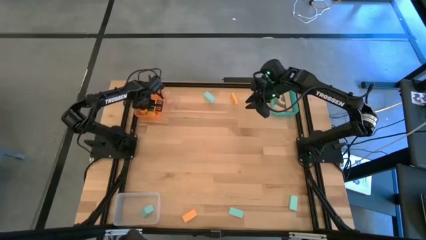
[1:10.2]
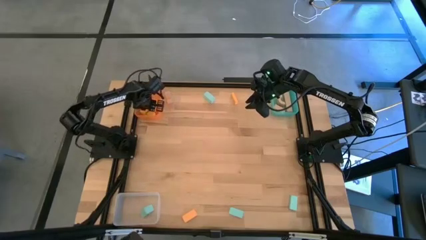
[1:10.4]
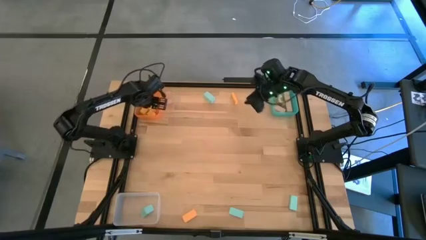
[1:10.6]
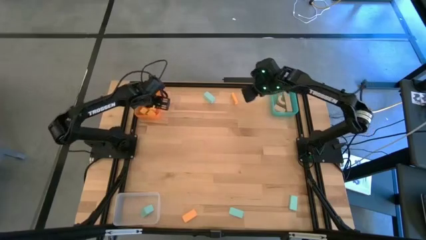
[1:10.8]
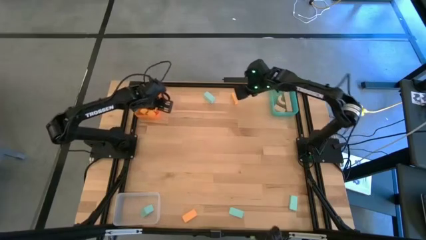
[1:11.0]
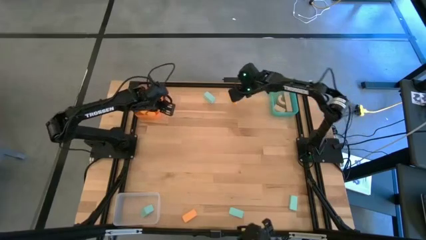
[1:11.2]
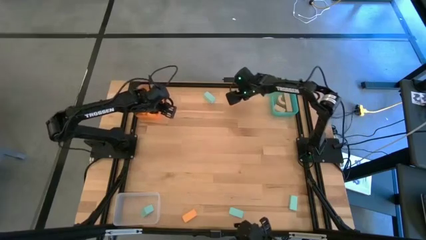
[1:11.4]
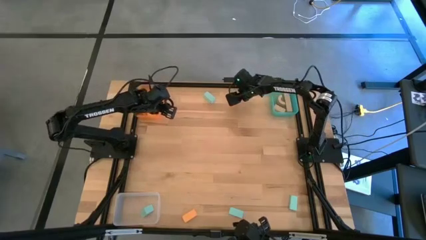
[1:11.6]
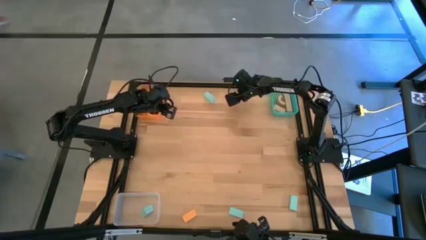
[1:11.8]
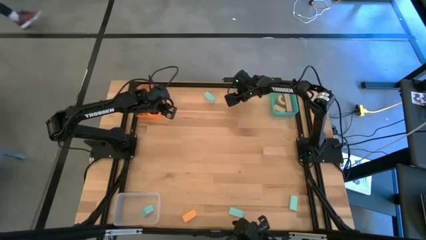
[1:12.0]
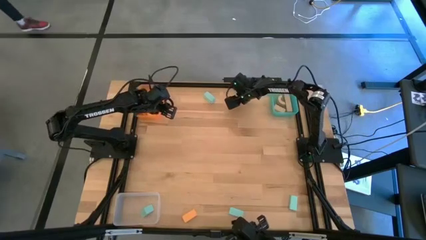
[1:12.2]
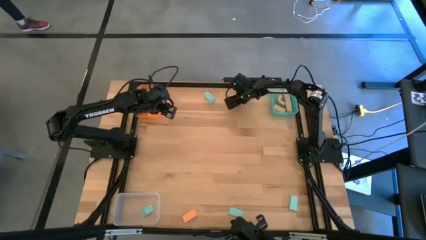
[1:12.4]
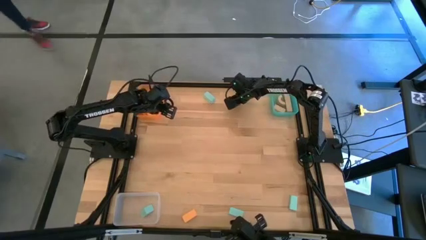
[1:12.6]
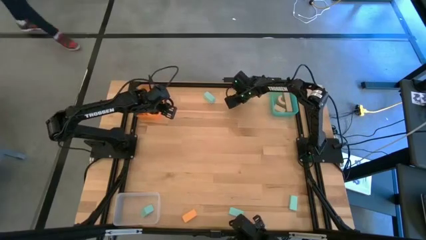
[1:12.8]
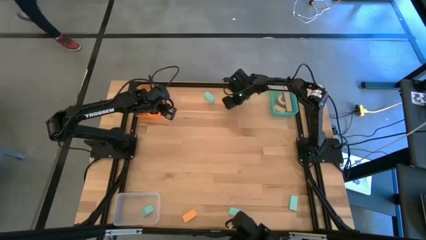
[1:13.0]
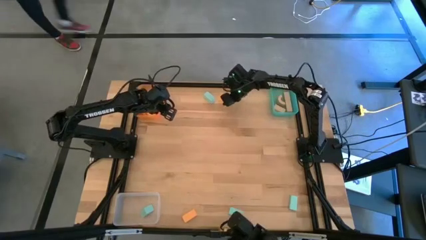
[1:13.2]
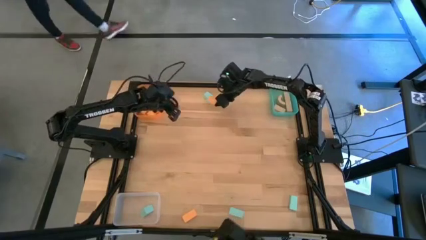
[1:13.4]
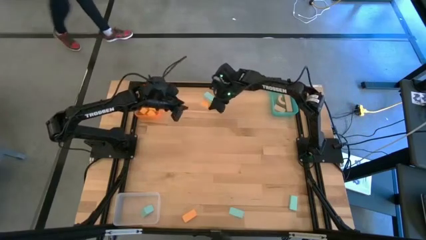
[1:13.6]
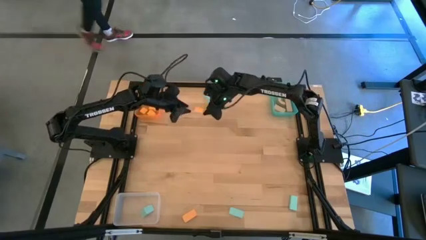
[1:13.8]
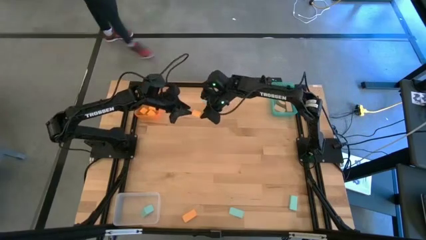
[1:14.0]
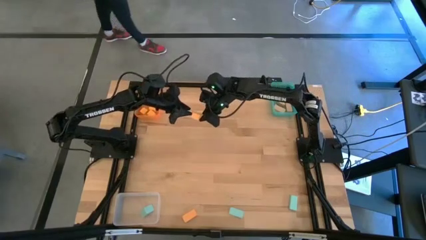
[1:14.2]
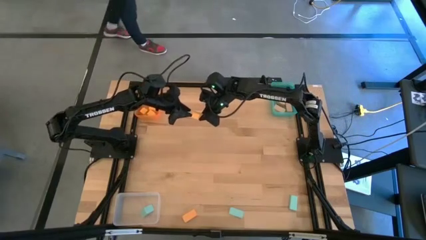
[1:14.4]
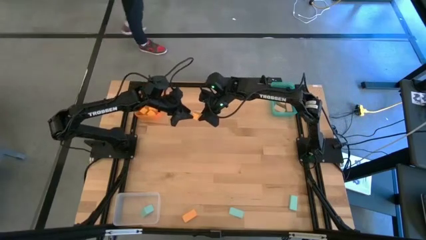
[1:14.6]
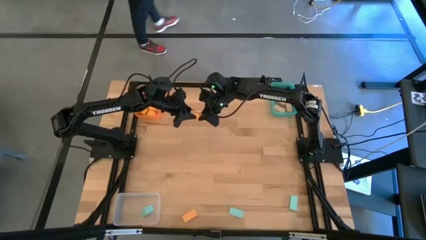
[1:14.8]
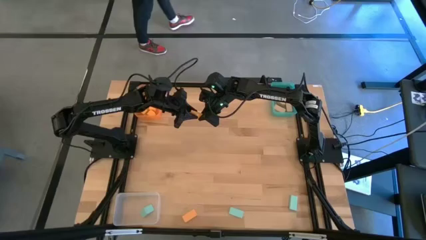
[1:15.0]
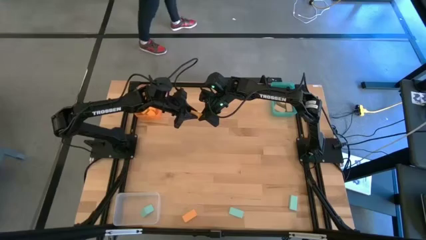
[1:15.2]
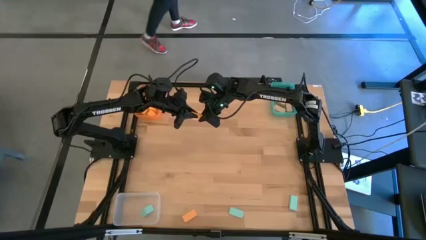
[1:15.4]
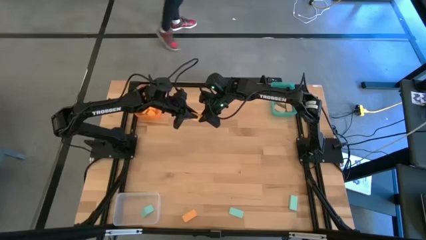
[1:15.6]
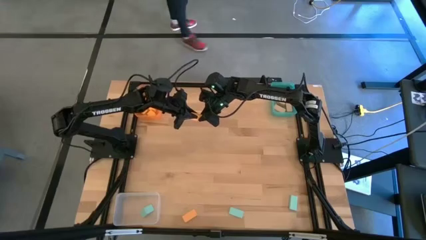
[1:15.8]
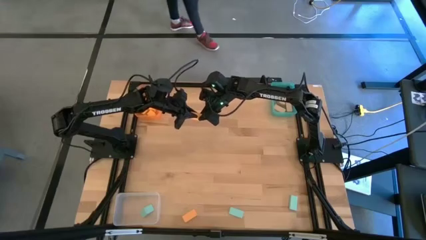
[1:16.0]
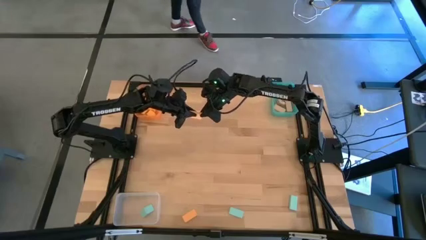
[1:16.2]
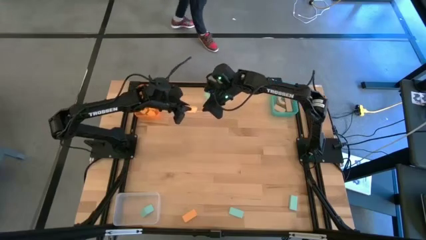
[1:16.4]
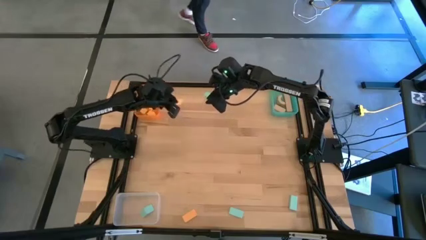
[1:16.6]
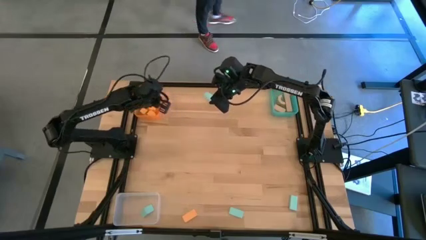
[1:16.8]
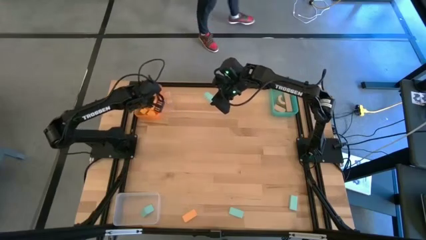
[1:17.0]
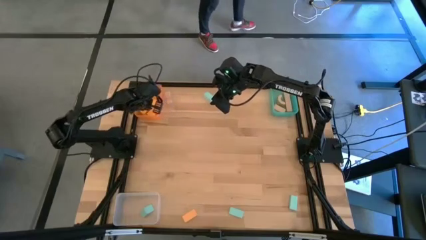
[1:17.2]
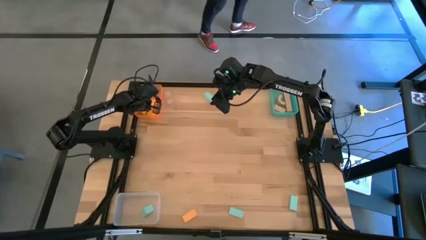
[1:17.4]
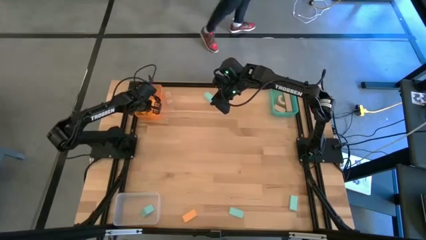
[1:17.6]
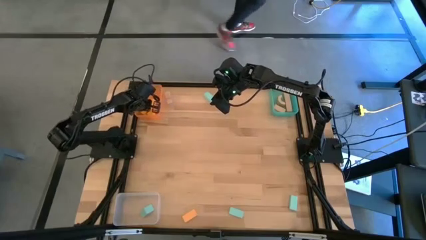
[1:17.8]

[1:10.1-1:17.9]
Task: Sort & place blocks by color
Put the orange block into the orange bin

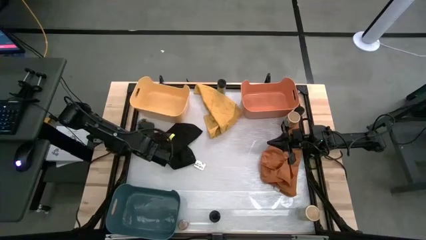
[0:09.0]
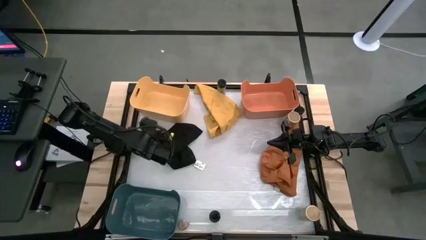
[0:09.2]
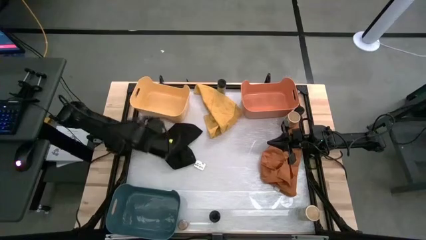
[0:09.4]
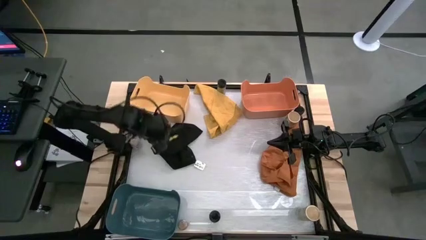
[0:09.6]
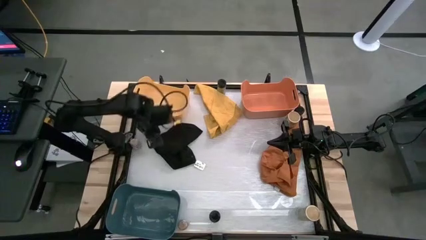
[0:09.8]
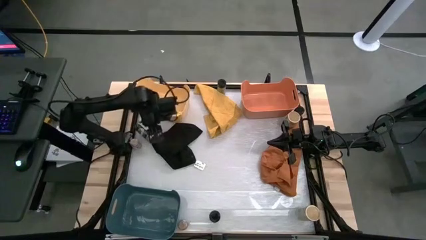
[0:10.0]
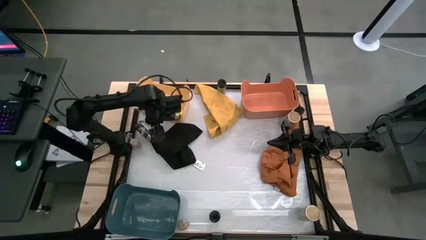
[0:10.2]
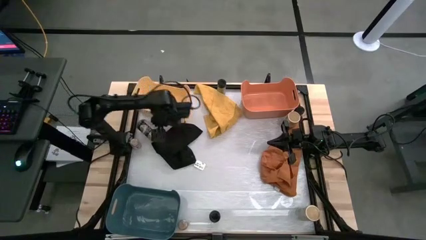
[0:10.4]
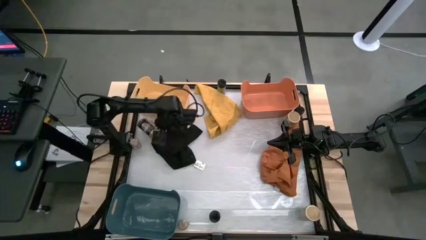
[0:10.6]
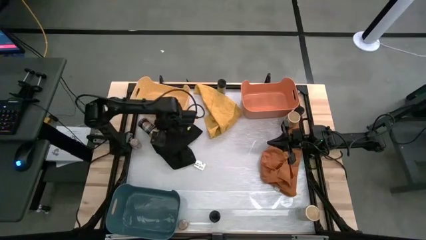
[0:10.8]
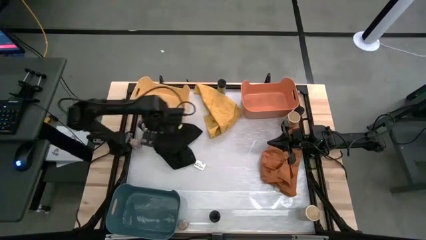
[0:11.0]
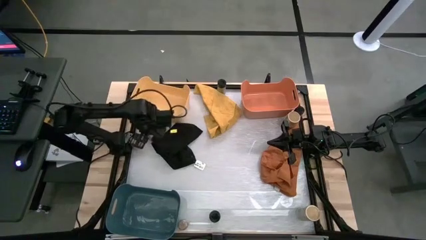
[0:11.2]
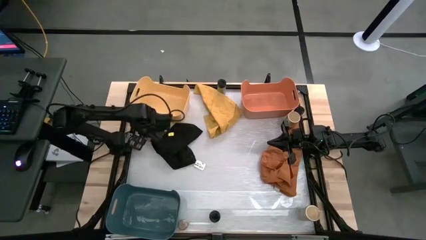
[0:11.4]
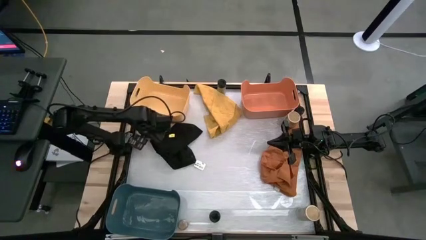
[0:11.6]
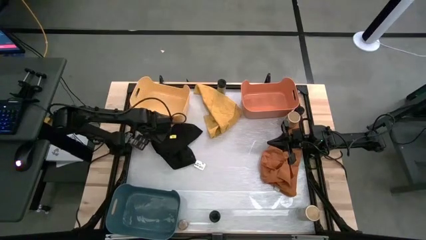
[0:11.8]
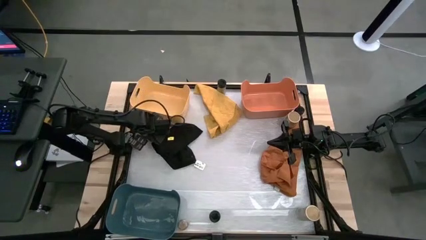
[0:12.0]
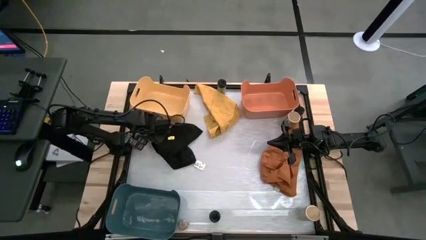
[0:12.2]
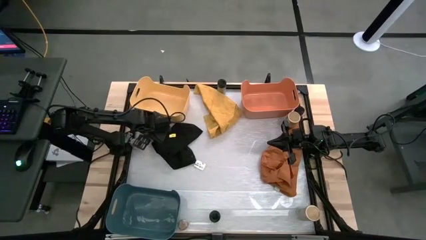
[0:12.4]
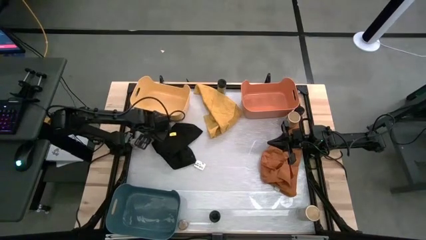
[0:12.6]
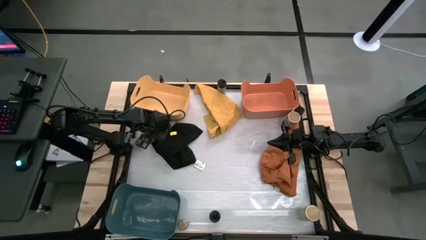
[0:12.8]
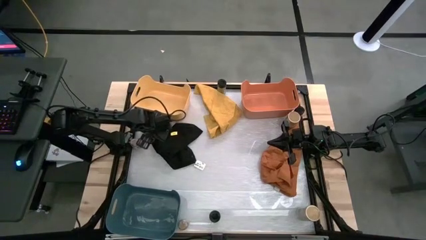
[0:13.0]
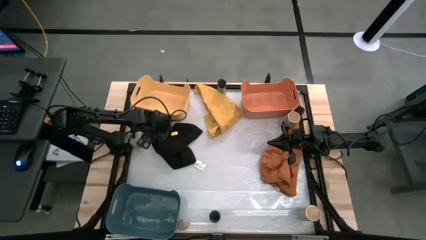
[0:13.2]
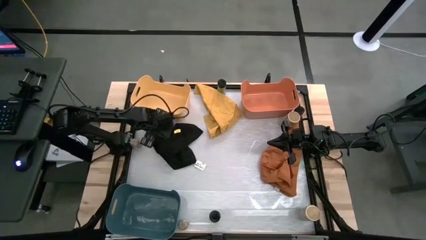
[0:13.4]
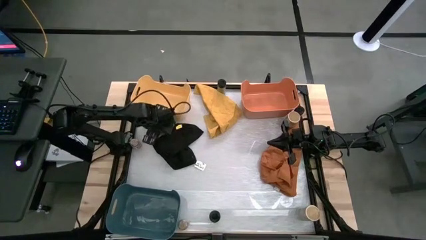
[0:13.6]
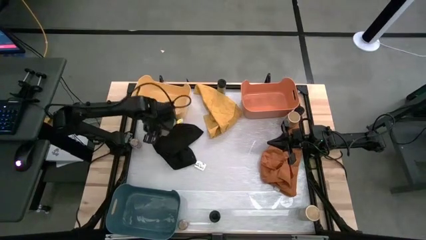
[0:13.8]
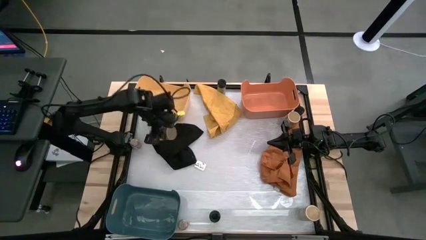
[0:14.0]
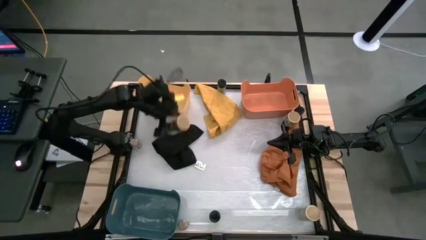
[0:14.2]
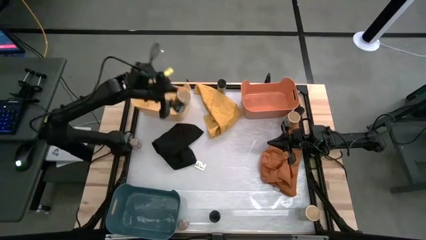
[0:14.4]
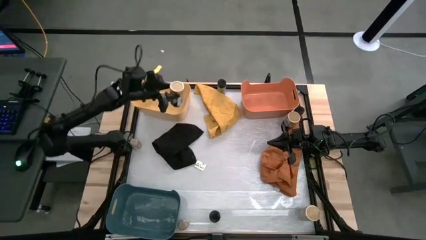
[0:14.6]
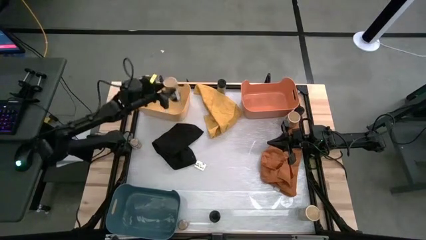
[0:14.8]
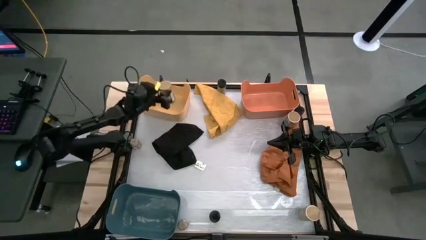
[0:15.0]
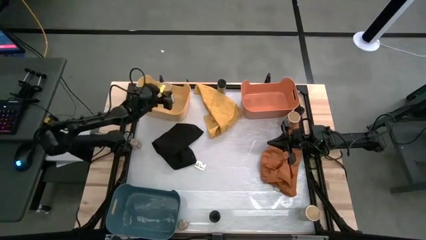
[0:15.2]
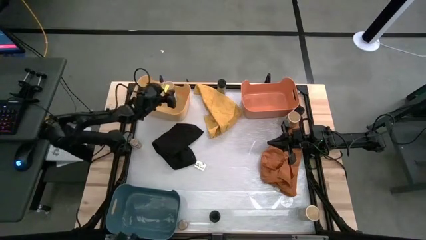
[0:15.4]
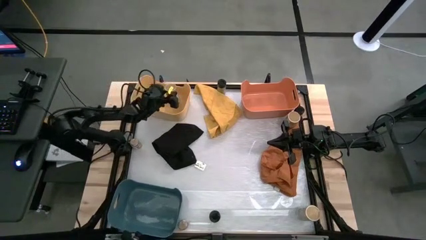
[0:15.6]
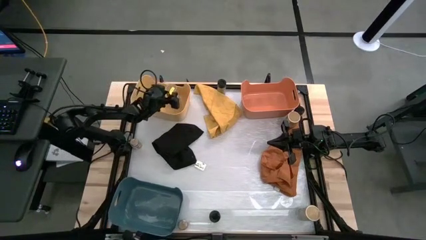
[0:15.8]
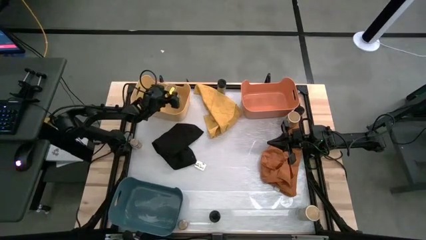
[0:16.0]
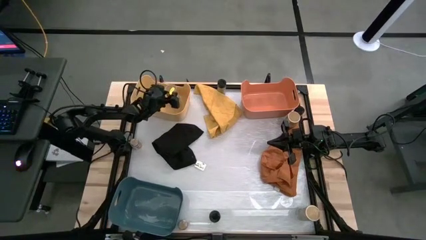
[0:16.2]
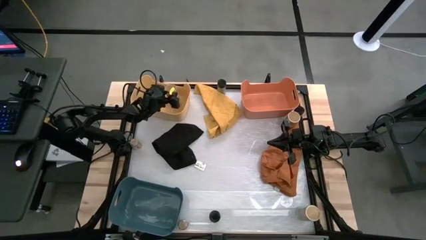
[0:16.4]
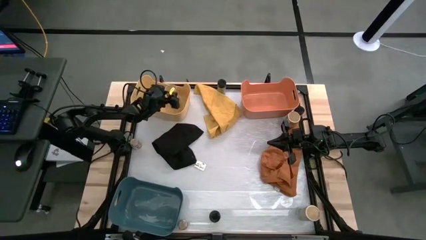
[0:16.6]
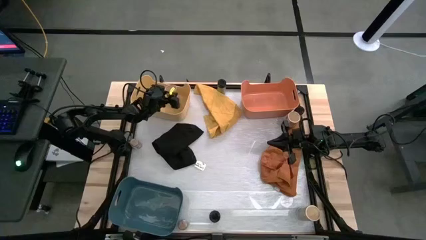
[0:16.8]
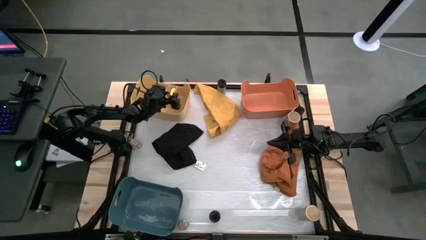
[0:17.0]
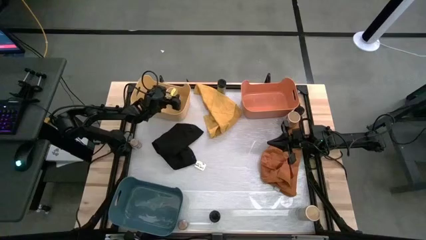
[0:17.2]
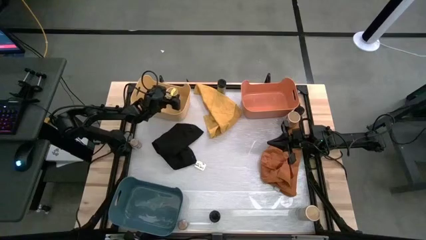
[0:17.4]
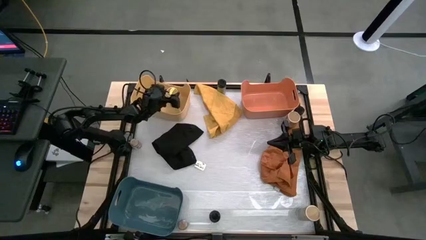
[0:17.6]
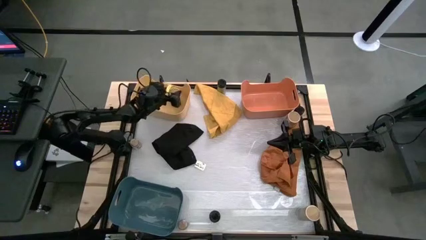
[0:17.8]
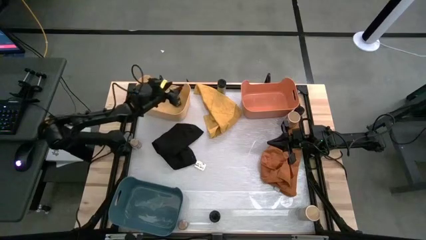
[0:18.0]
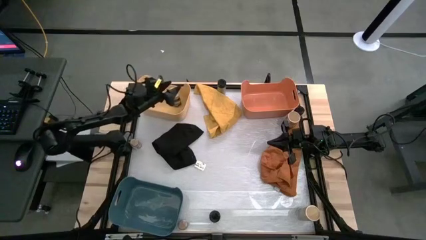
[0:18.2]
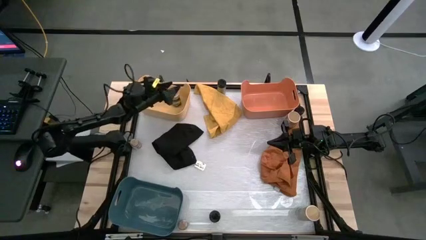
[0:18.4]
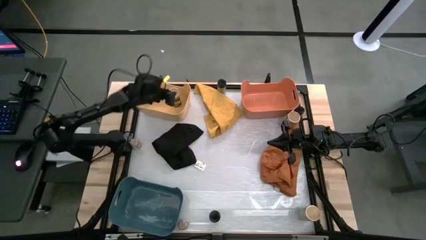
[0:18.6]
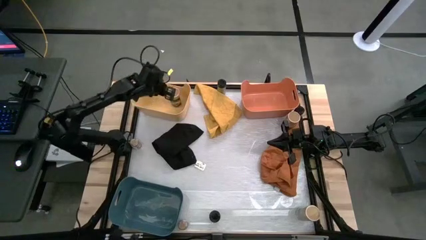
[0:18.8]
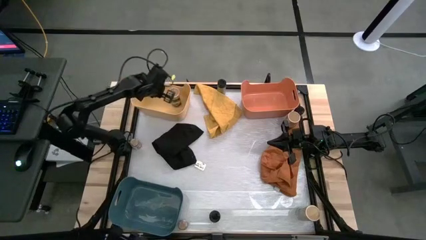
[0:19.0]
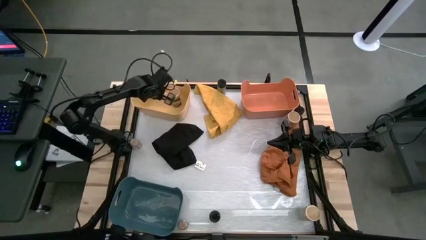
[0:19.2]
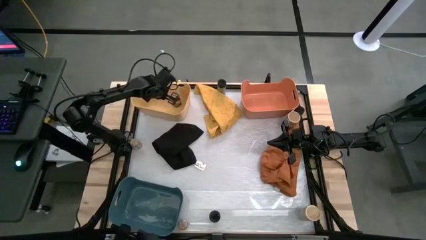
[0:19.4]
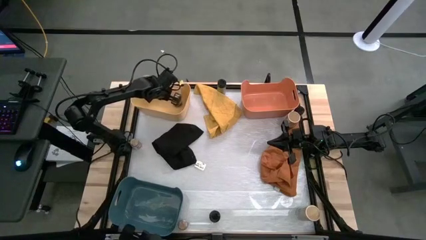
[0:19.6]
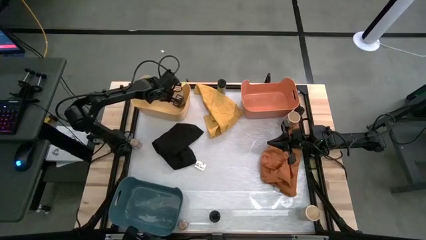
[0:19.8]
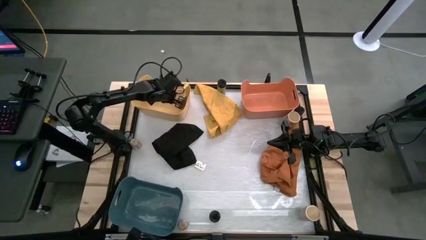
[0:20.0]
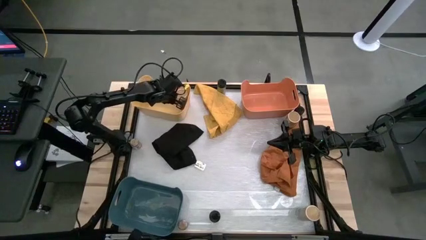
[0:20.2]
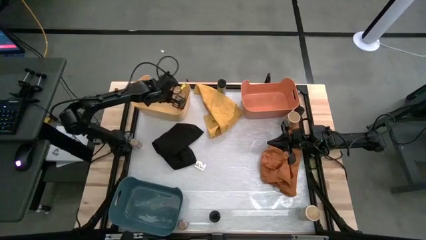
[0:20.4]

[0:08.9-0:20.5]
Task: Sort spices by type
Put the left gold seasoning bottle into the yellow bin
